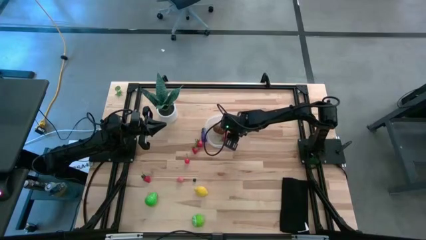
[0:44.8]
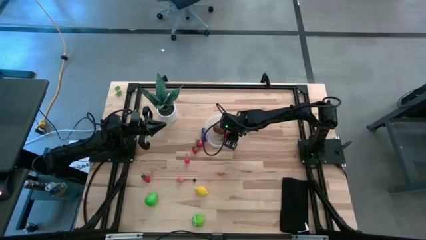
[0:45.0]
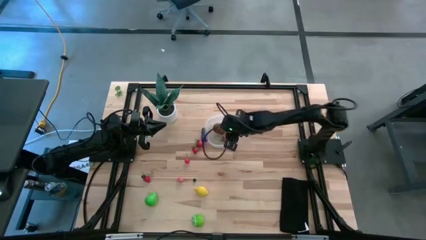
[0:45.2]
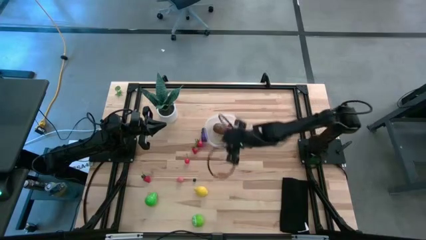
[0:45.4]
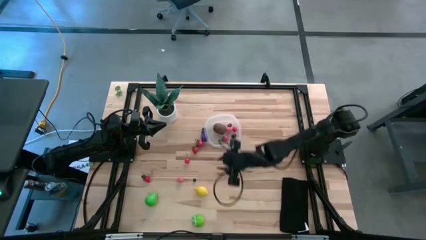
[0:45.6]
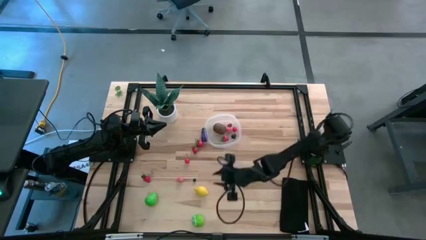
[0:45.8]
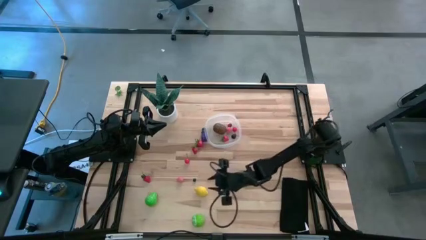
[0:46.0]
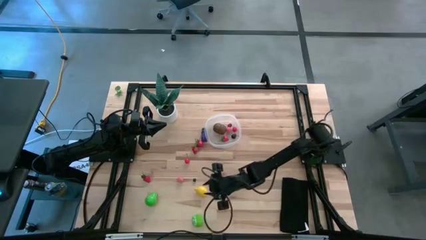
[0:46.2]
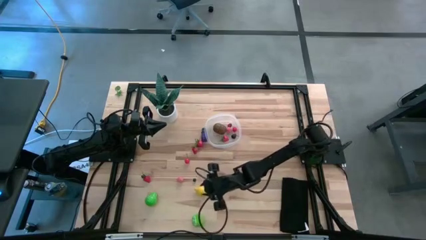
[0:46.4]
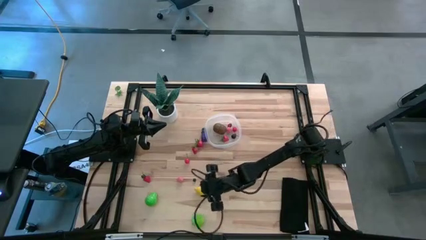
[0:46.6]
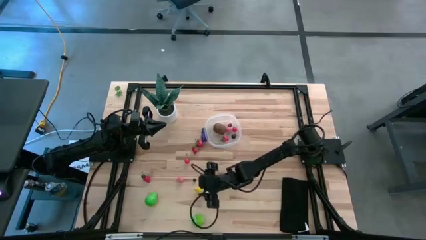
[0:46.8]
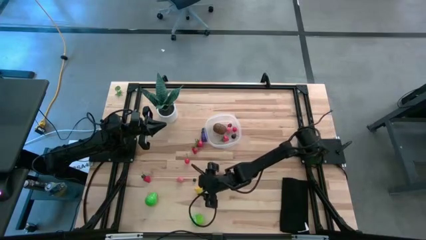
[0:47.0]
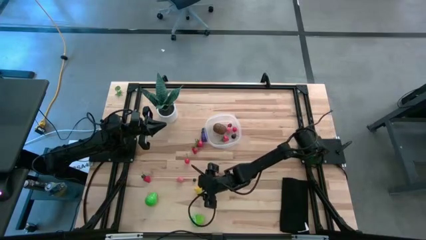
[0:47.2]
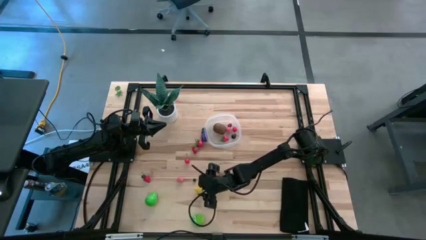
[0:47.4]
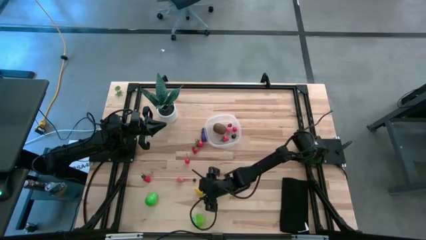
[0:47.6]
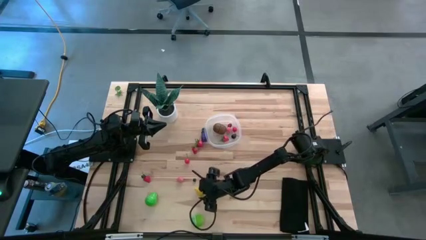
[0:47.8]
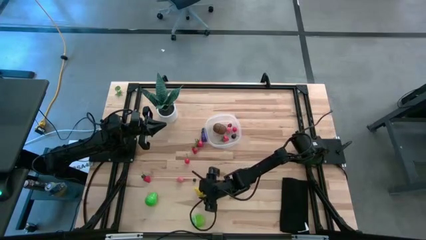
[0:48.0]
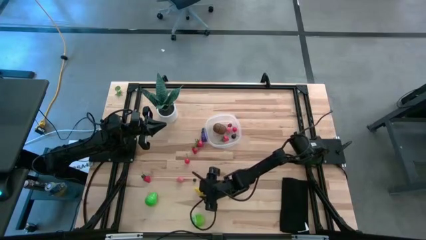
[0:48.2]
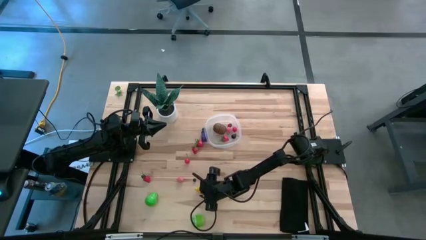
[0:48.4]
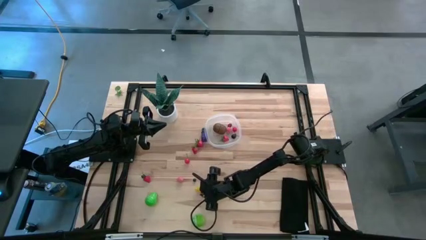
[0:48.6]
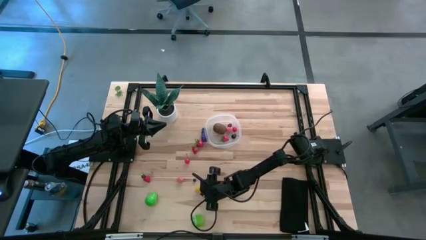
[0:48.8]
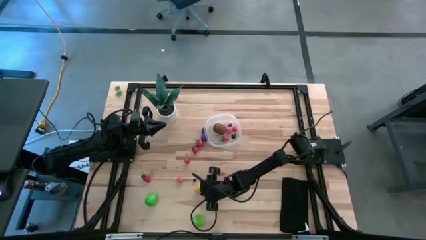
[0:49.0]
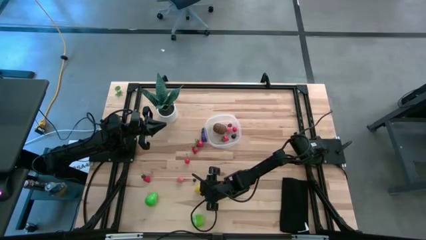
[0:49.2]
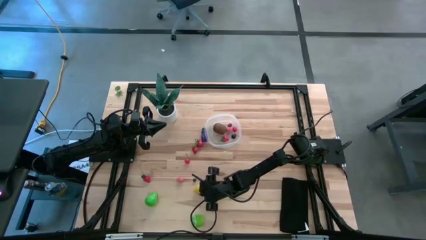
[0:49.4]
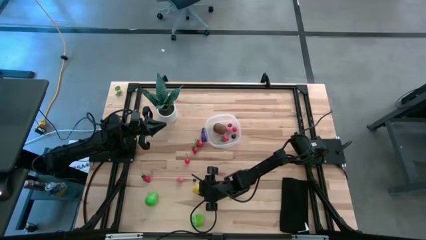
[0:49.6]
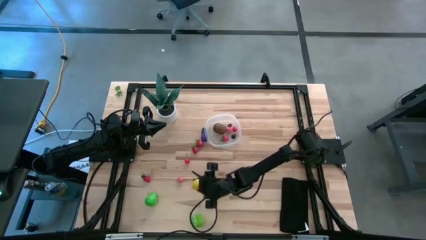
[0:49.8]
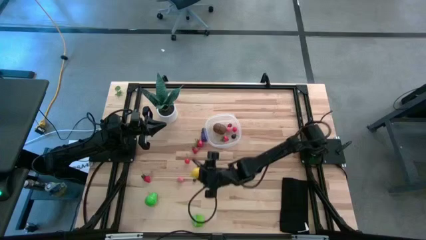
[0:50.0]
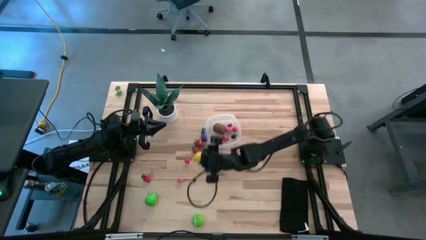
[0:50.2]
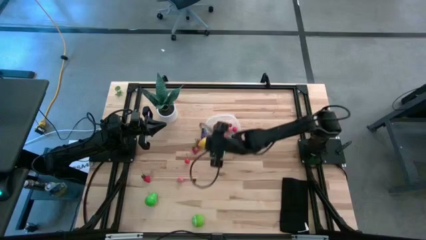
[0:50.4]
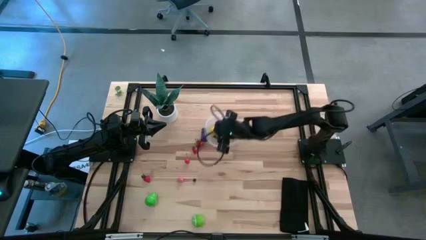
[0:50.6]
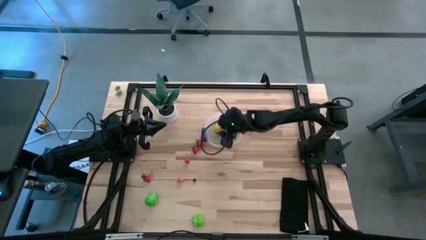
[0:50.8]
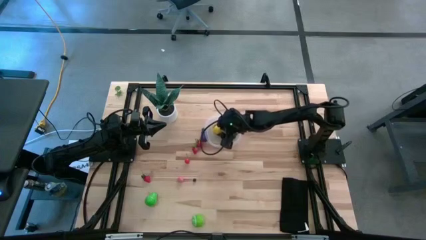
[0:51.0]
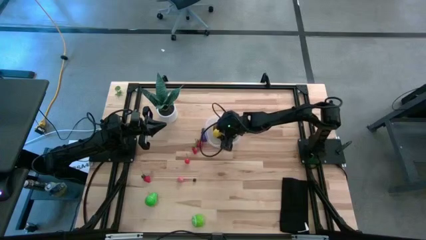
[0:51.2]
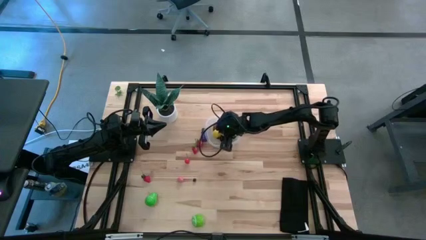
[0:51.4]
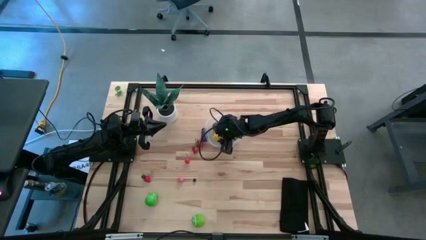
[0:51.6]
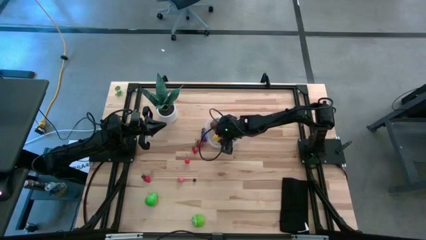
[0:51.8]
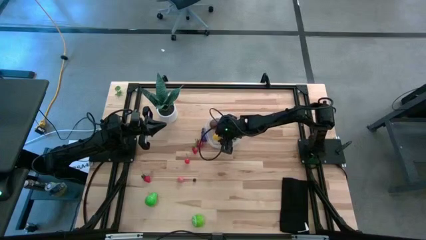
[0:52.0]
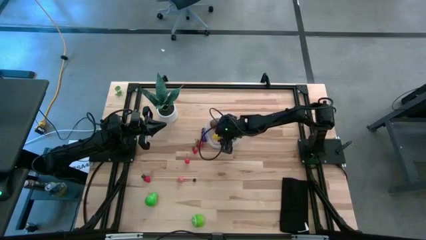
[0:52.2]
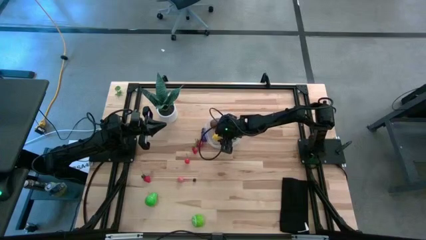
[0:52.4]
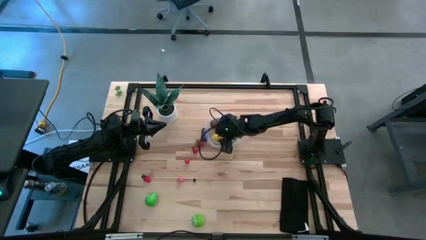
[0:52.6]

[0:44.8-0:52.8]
Task: Pick and placing Produce into tupperware
Put the lemon into the transparent bin

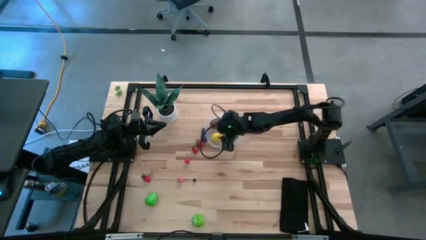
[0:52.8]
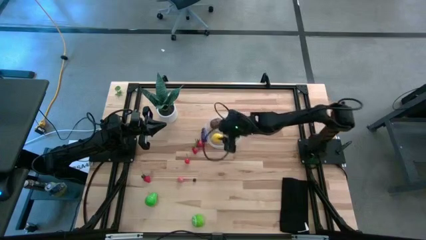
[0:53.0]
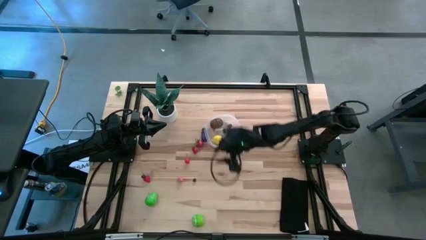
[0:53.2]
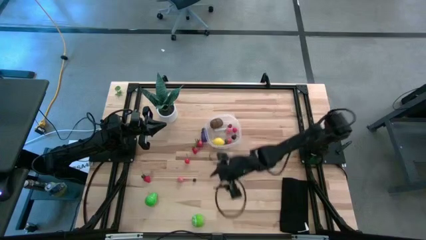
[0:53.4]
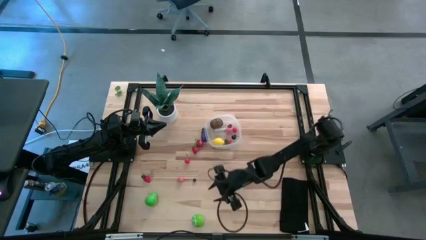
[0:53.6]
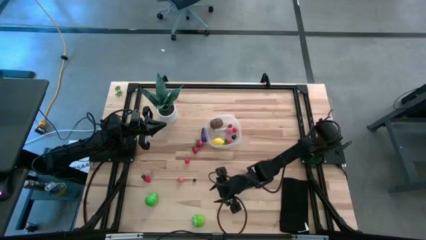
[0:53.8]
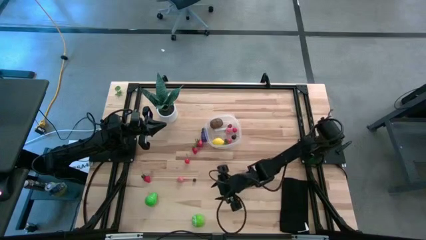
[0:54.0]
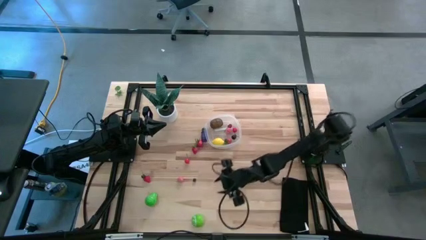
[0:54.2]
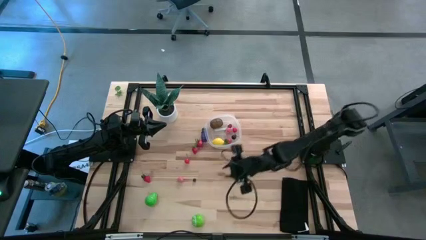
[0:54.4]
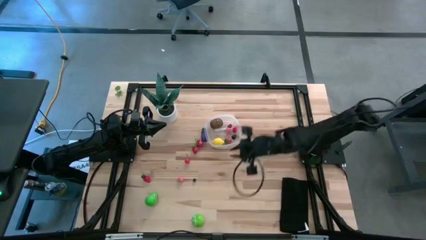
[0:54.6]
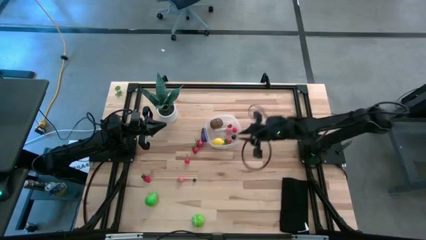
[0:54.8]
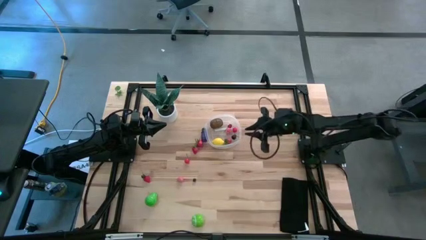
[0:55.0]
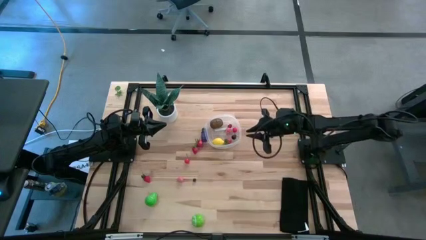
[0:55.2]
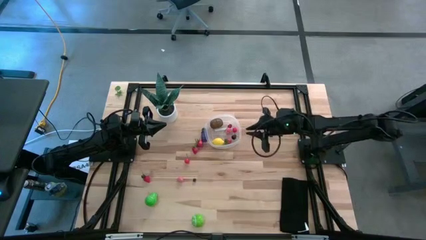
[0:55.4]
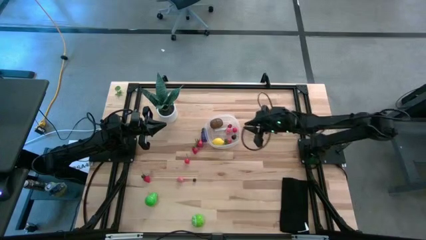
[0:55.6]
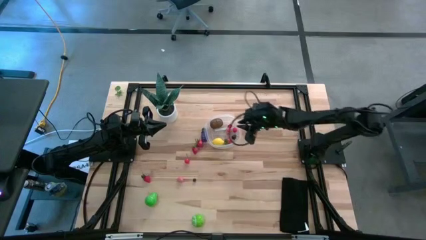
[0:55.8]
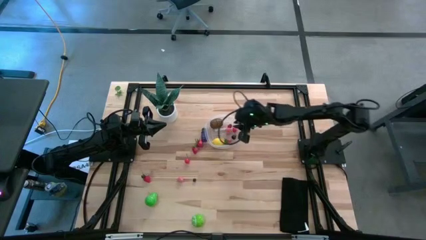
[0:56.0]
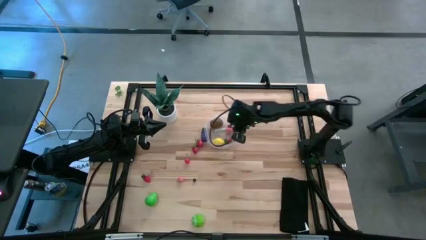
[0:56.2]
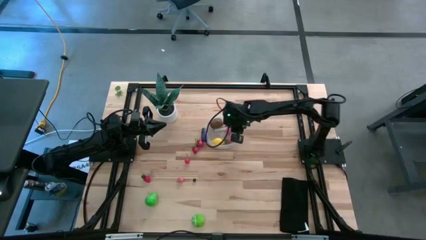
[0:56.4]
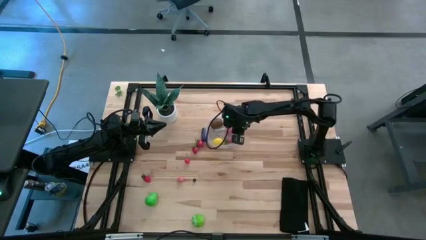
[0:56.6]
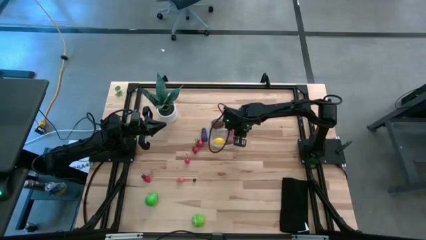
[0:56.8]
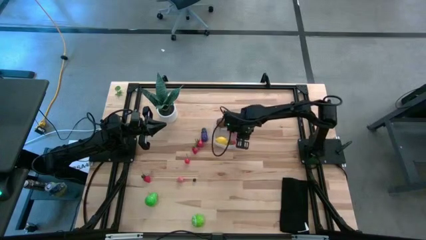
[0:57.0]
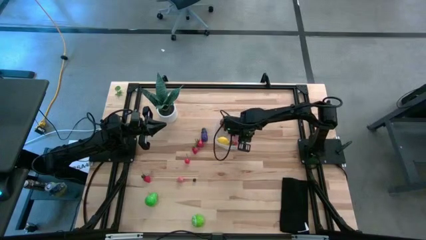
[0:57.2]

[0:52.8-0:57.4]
Adjust the transparent bin

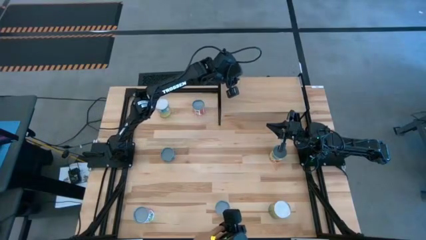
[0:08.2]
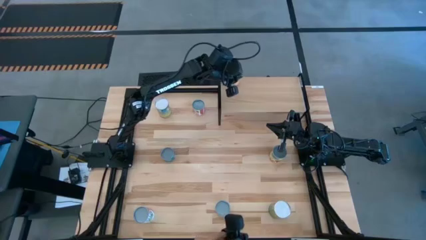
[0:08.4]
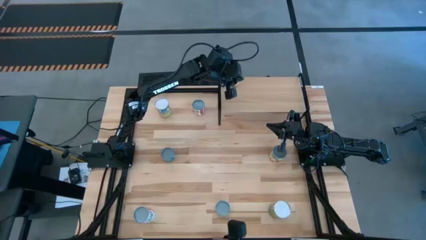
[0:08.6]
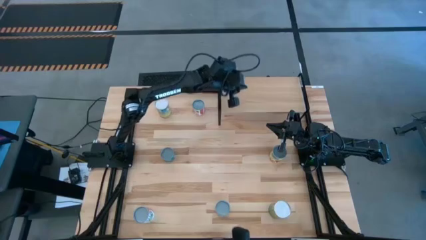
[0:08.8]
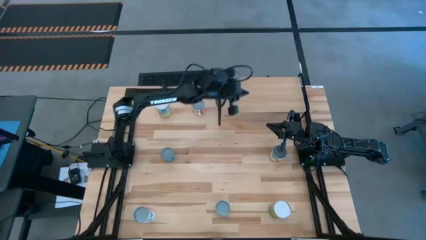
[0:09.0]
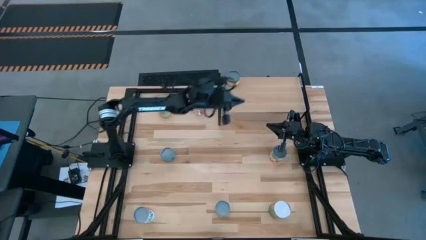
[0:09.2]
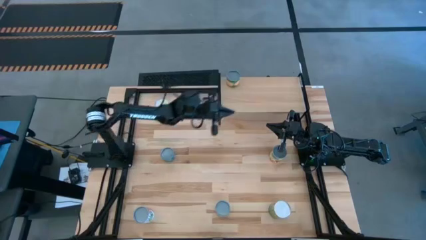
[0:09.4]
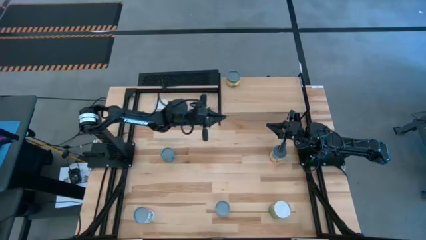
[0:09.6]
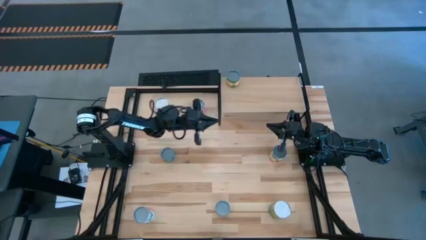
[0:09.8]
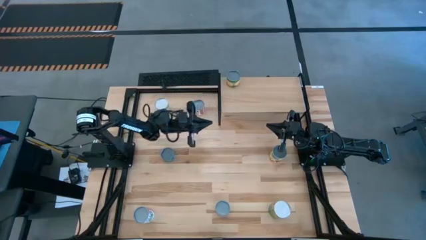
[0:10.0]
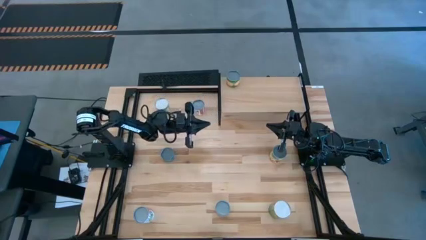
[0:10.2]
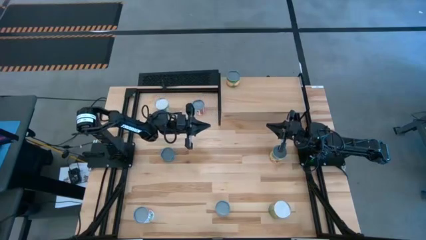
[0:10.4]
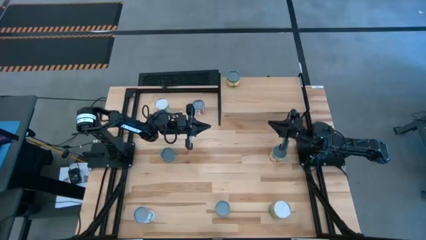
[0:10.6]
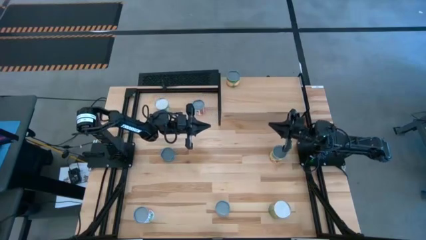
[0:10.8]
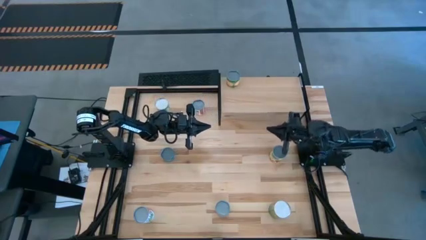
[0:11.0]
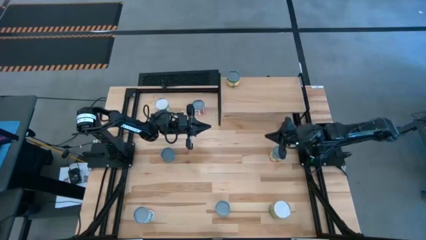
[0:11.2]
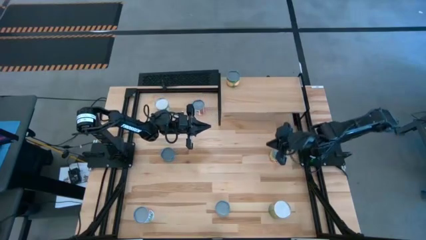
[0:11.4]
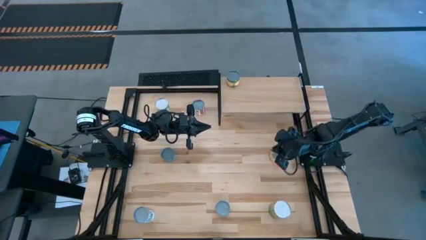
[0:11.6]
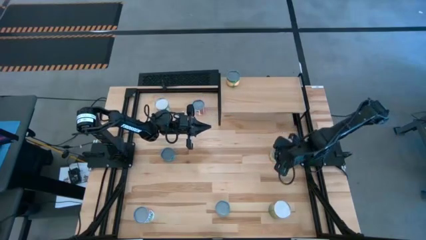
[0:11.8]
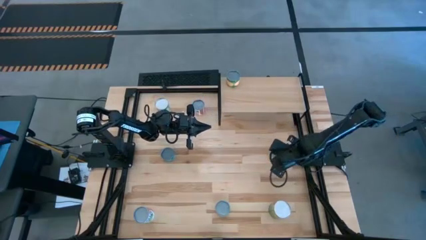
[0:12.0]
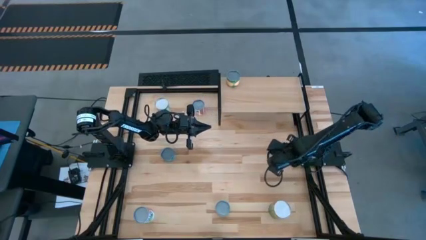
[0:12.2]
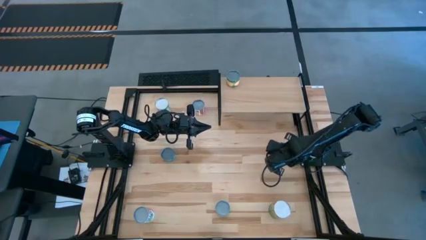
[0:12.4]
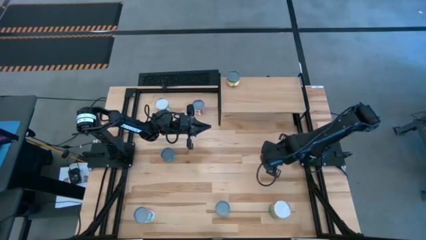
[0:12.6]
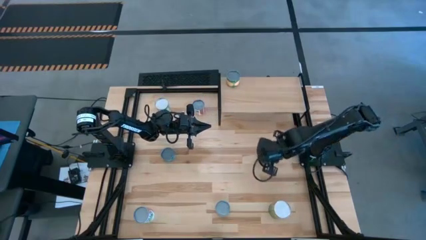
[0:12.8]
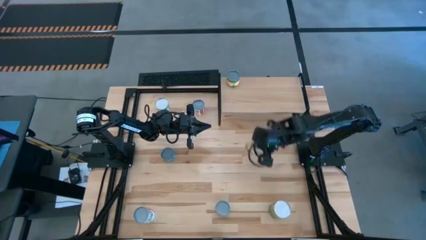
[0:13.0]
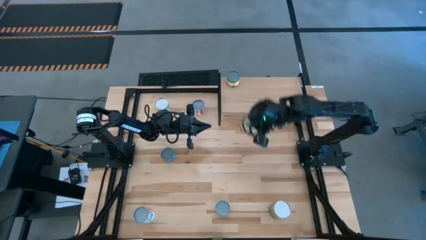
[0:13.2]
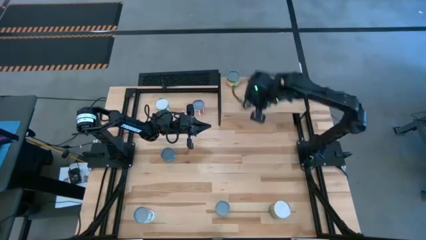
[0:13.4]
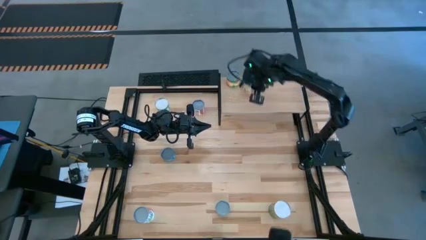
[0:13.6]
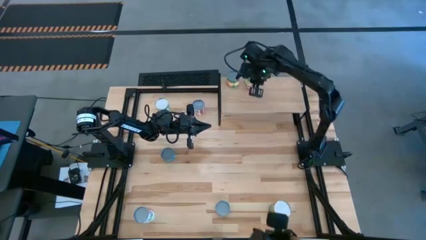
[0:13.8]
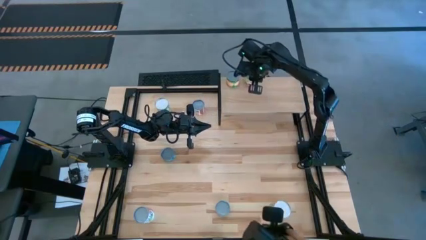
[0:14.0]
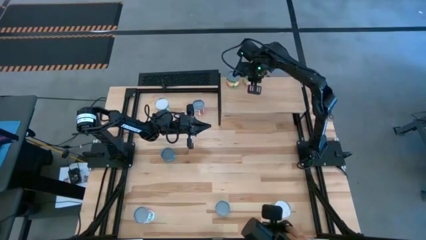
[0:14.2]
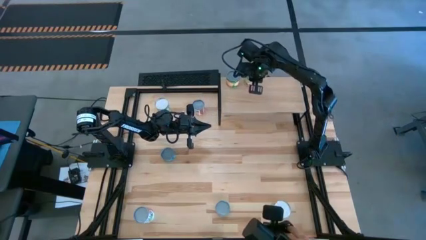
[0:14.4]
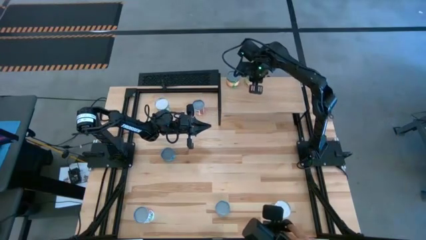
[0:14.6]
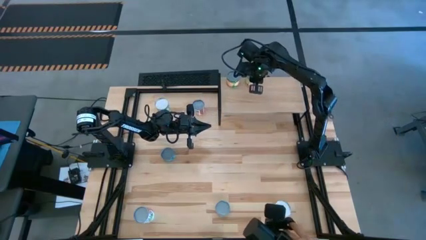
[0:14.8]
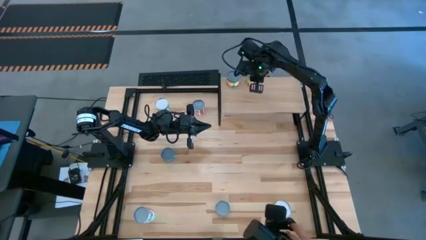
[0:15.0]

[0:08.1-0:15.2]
Task: Pick and place cans onto a shelf
Put the canned spaghetti sauce on the shelf
